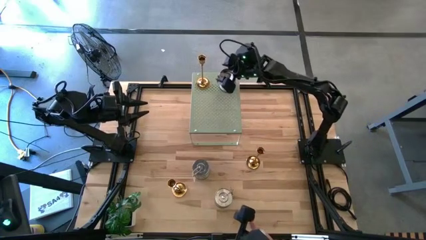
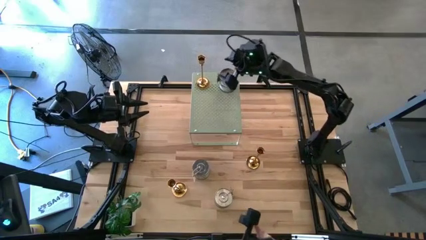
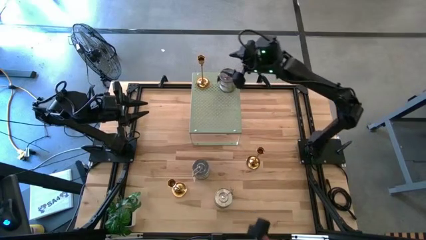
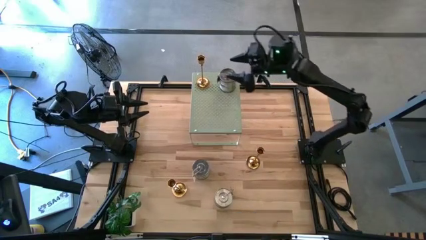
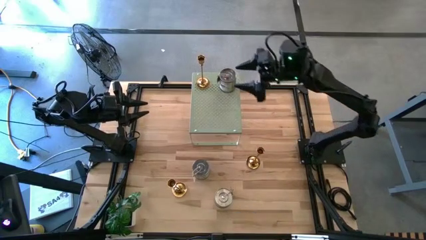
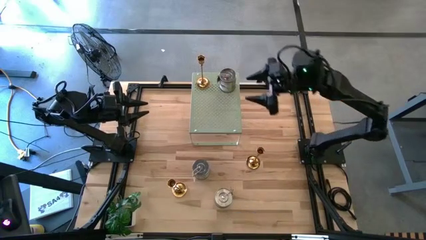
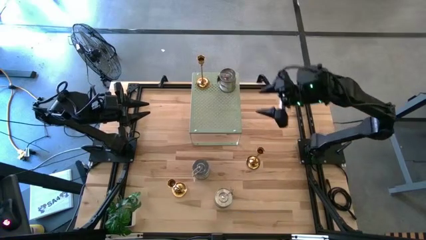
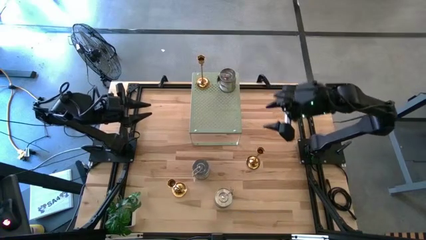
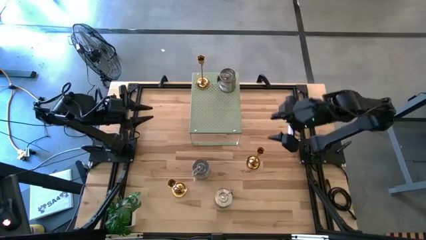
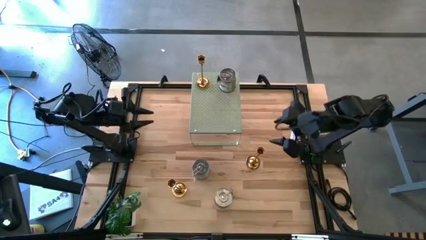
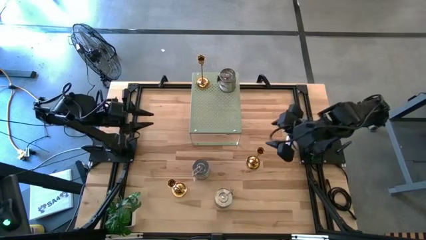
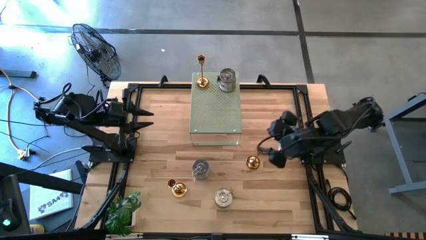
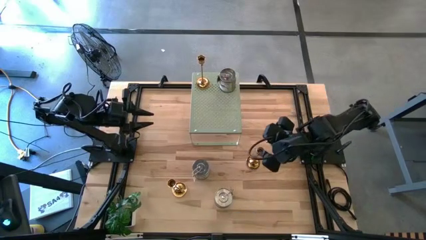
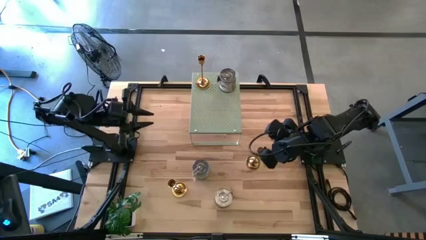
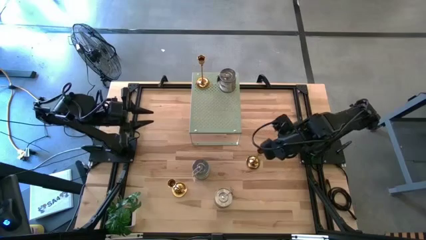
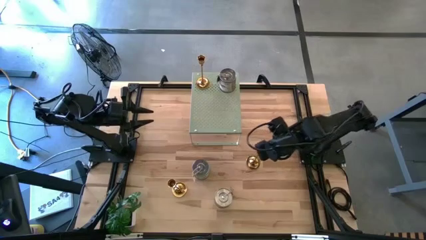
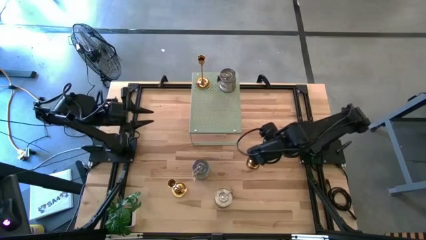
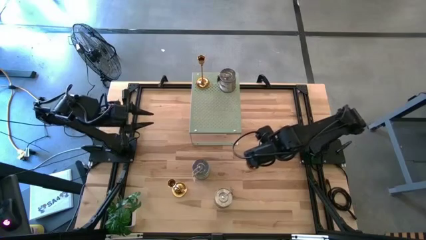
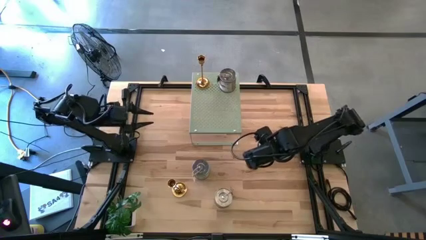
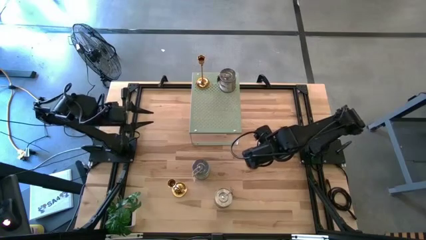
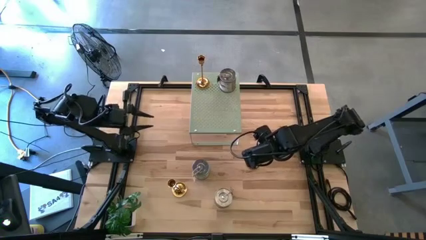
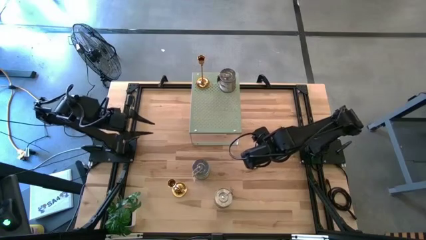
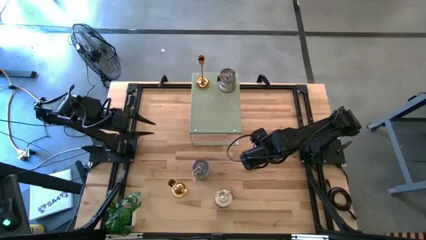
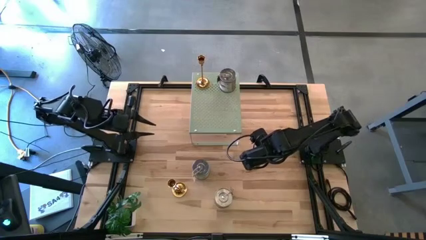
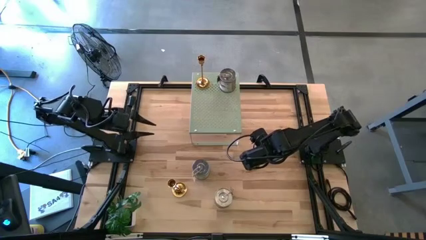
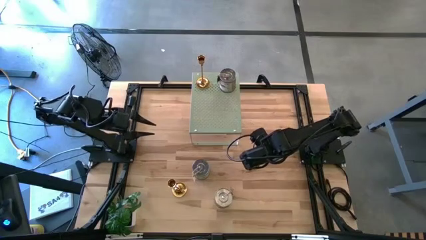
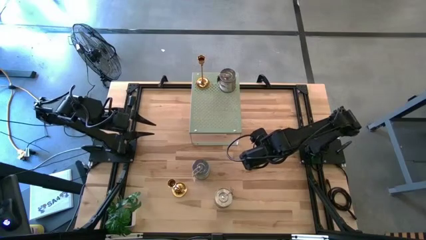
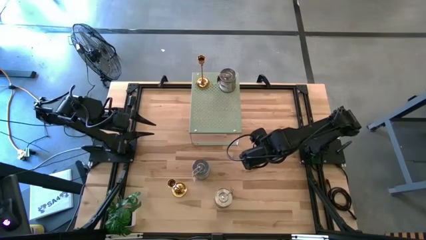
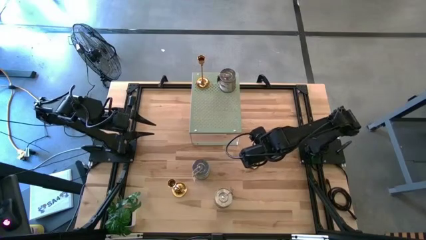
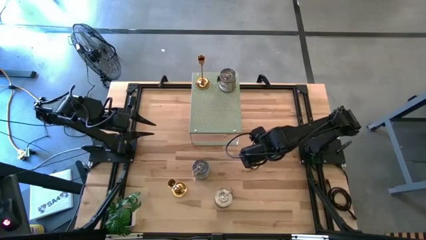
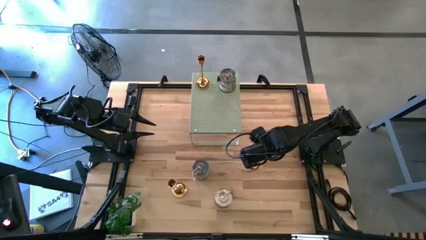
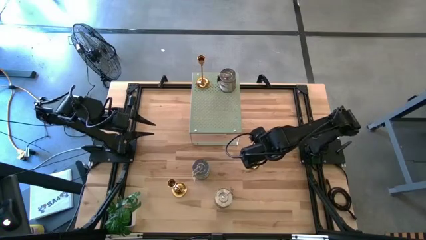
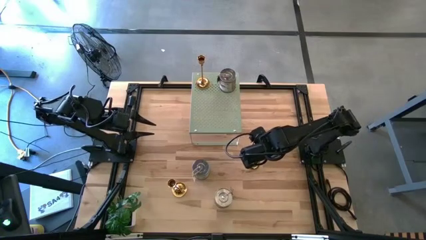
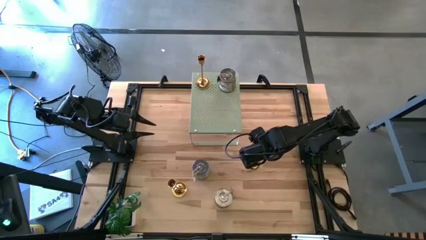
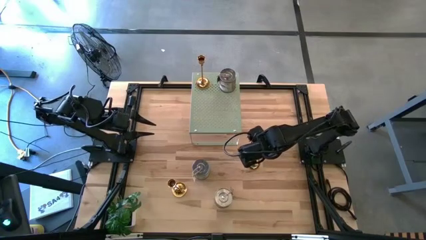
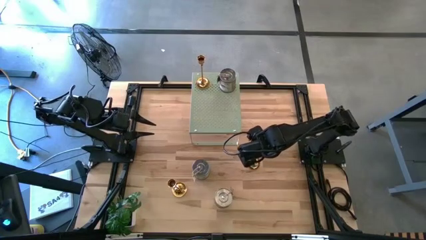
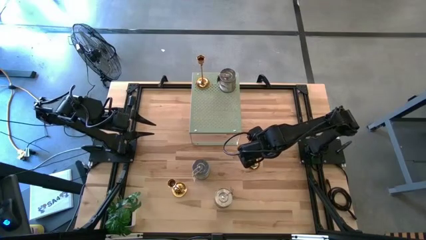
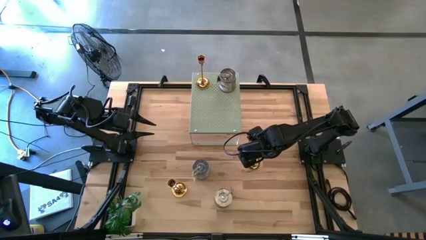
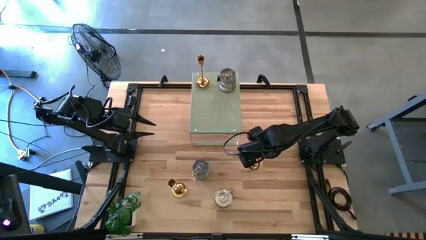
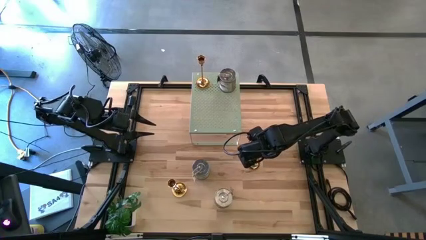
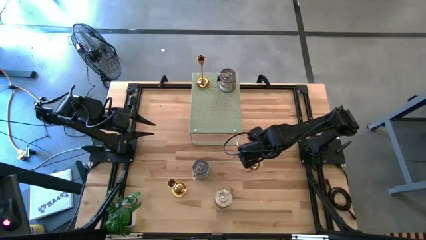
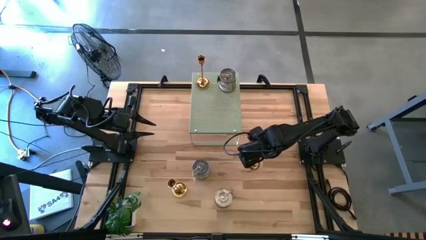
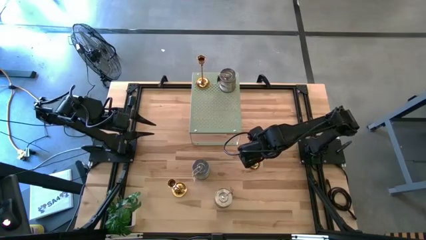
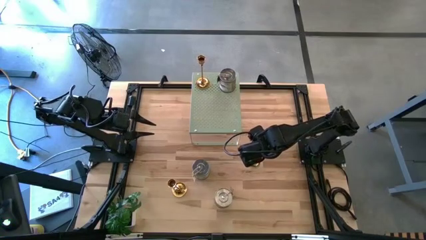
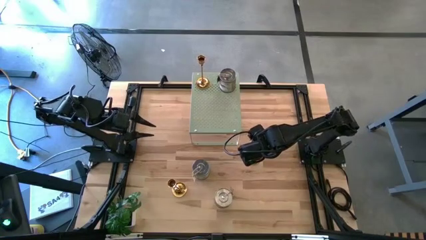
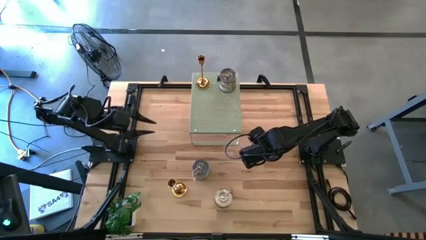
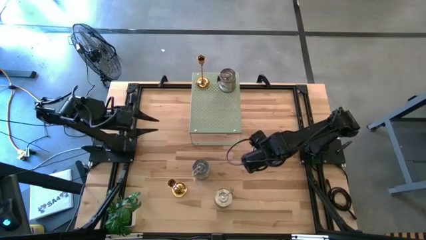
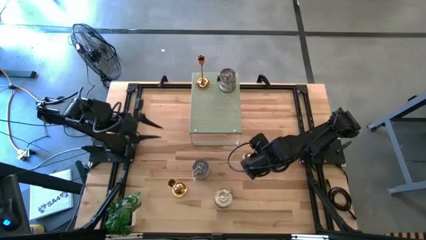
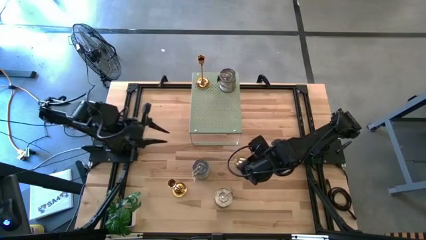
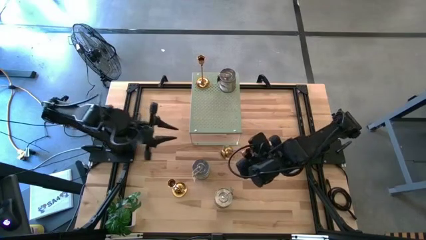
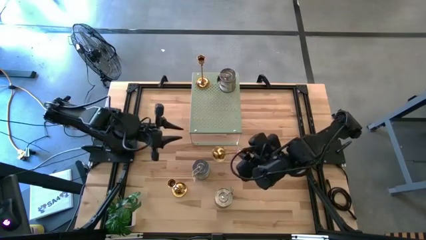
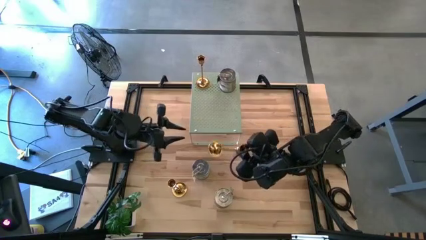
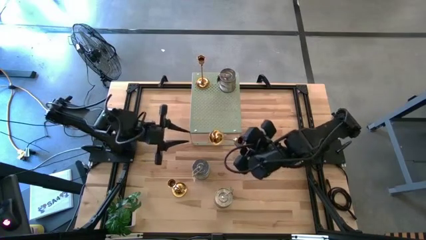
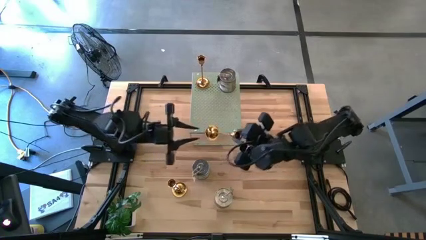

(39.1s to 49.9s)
Task: Pick & Place candle stick holders
Put the right gold candle holder on the shelf aligned with the other gold candle holder

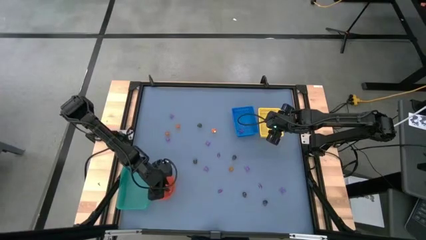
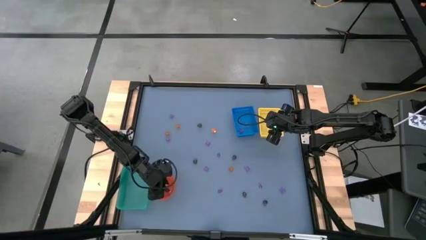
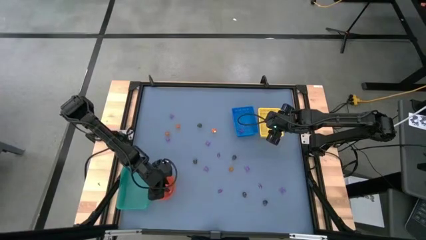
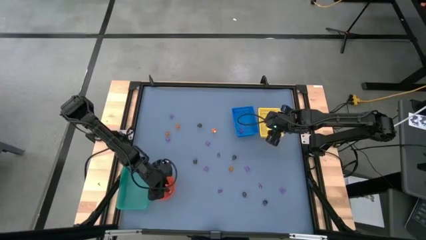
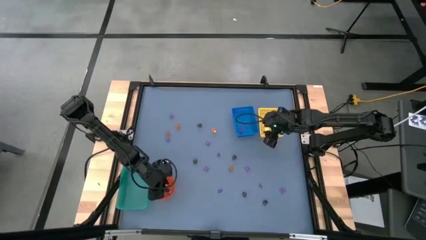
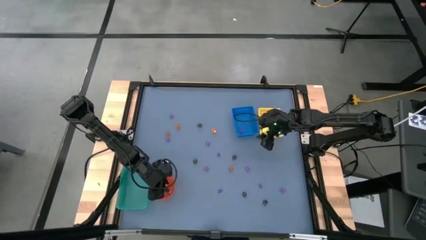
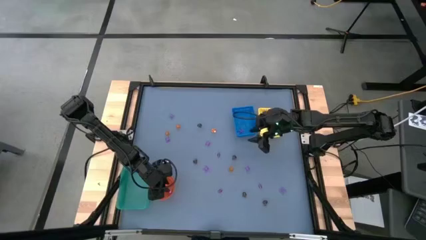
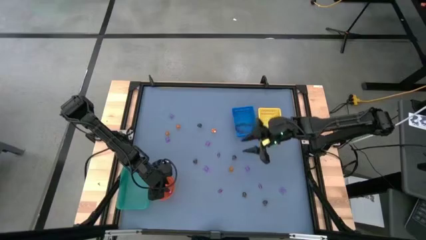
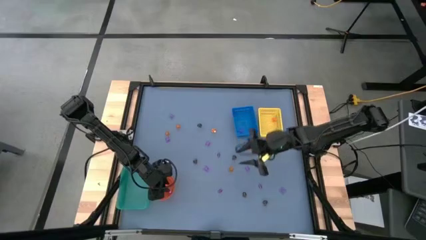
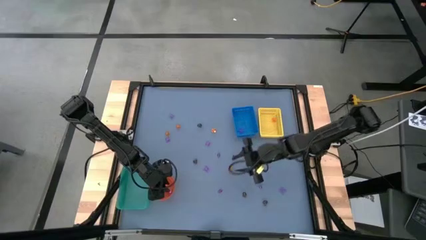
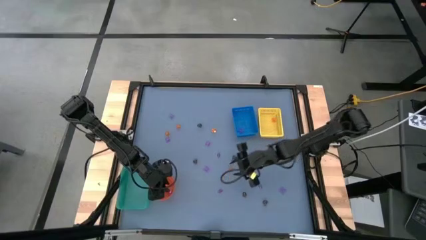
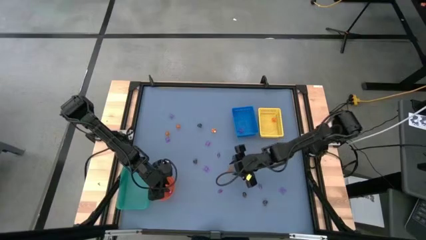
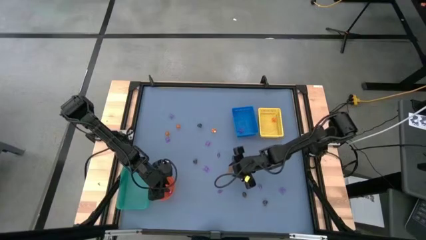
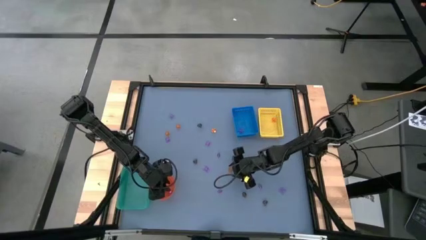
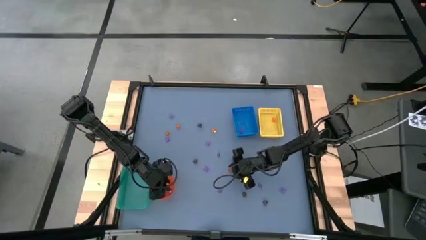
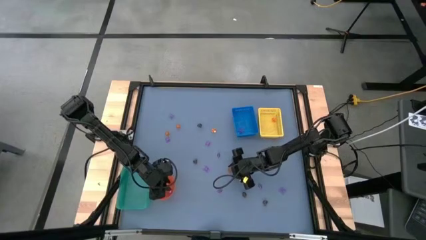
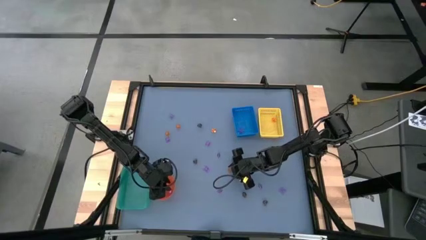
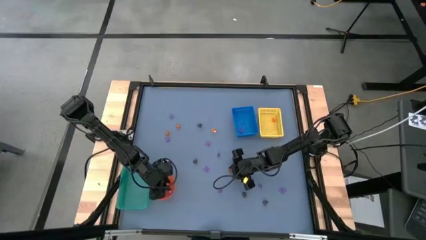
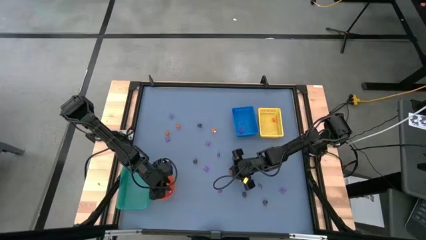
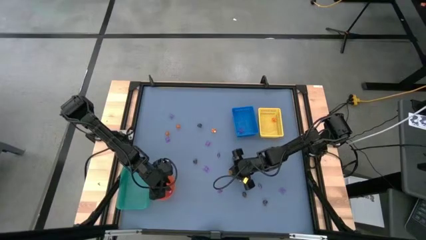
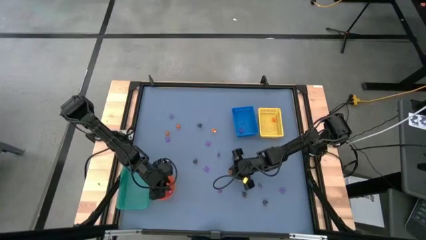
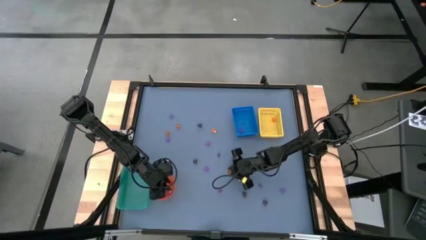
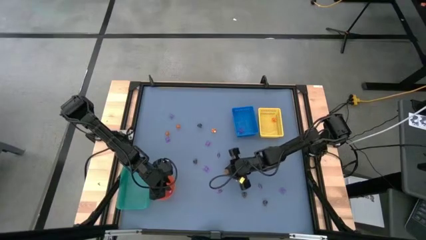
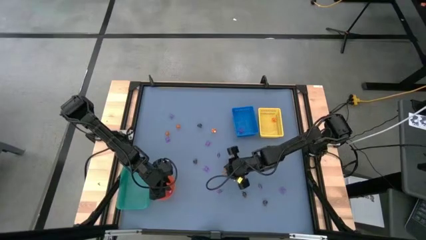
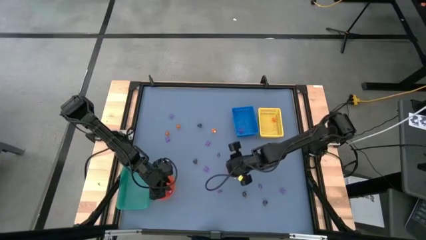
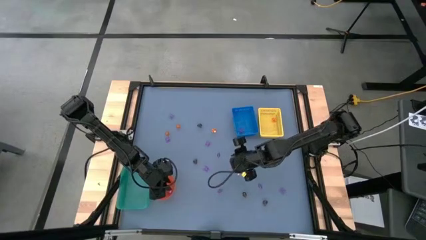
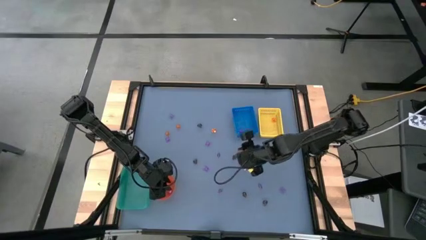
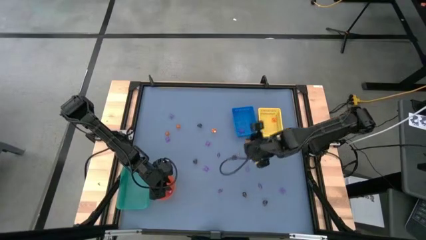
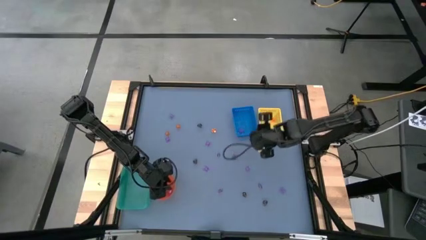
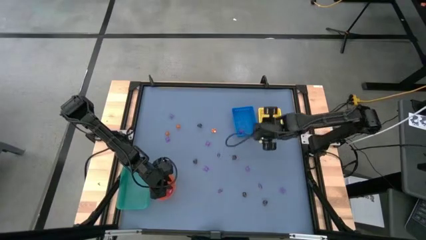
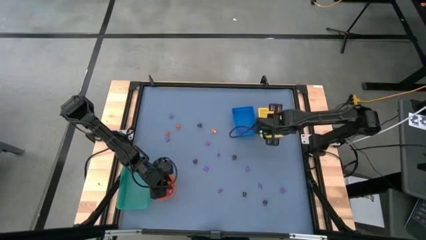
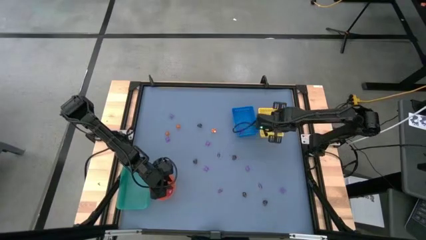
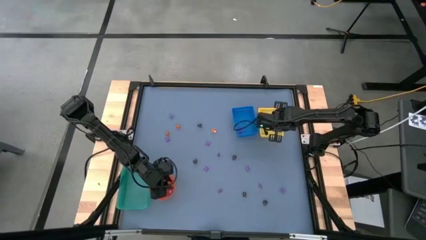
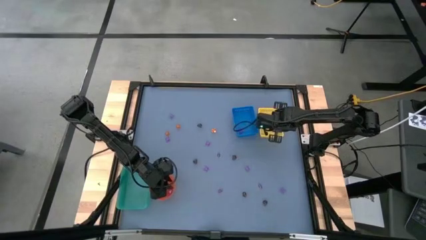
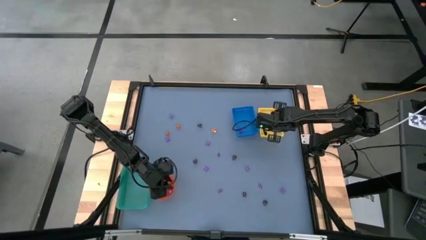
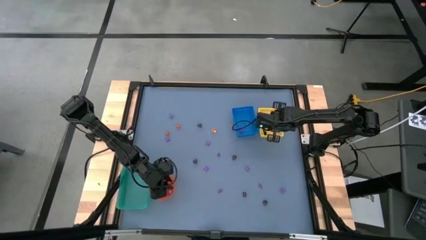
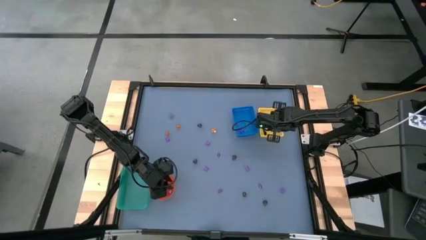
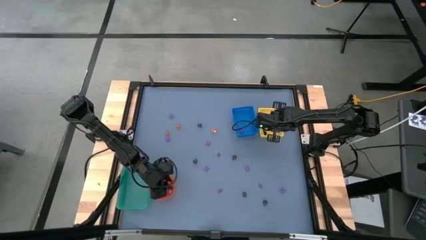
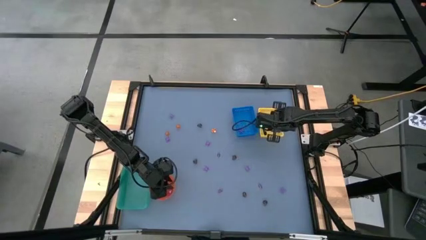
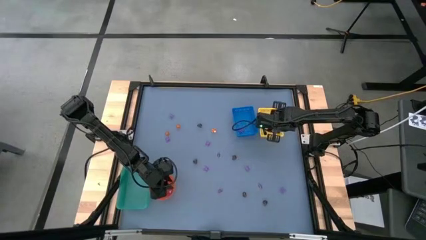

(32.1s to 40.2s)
Task: Sort Halloween decoration
Put the orange pumpkin toy into the yellow box
